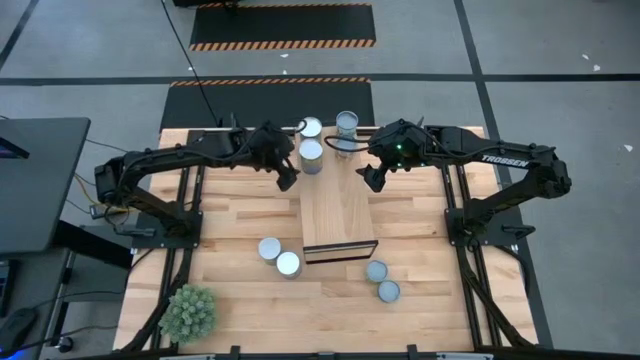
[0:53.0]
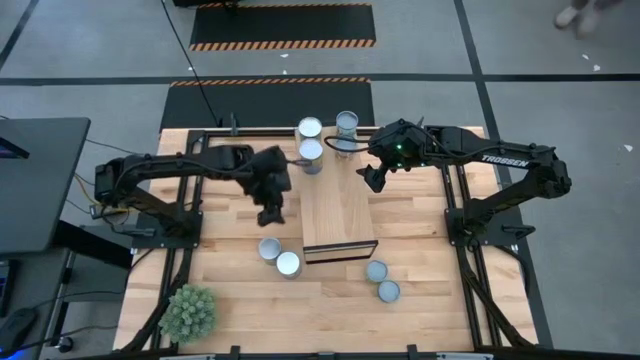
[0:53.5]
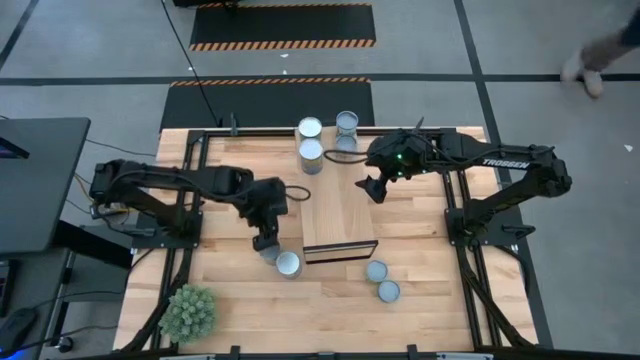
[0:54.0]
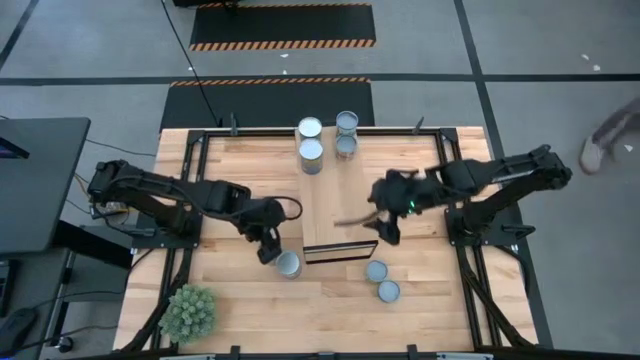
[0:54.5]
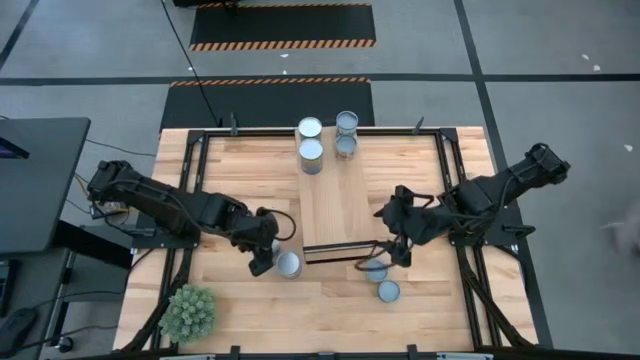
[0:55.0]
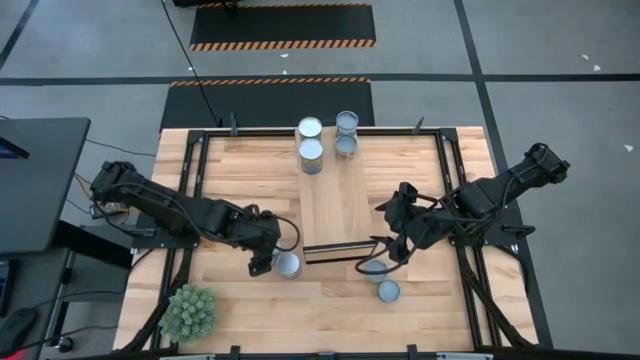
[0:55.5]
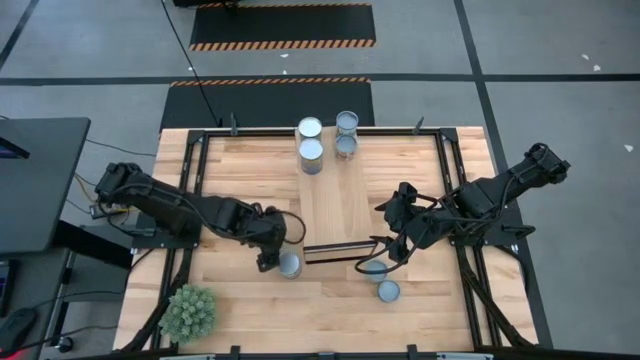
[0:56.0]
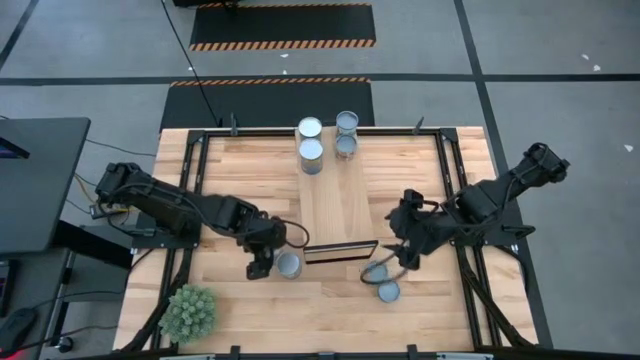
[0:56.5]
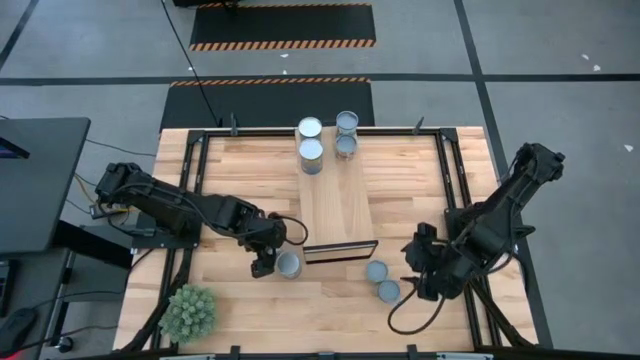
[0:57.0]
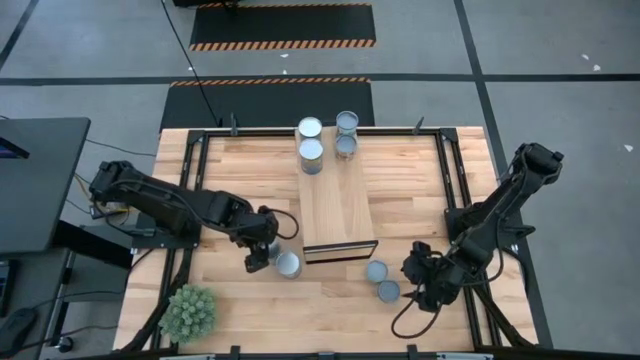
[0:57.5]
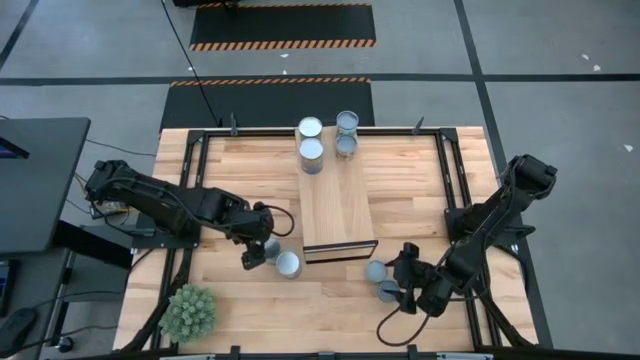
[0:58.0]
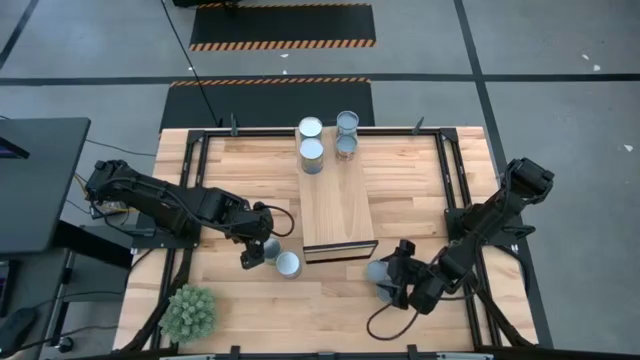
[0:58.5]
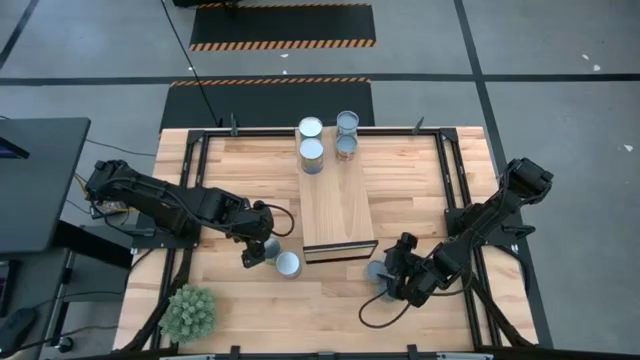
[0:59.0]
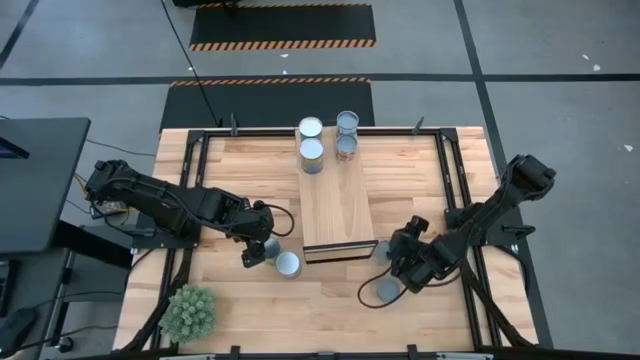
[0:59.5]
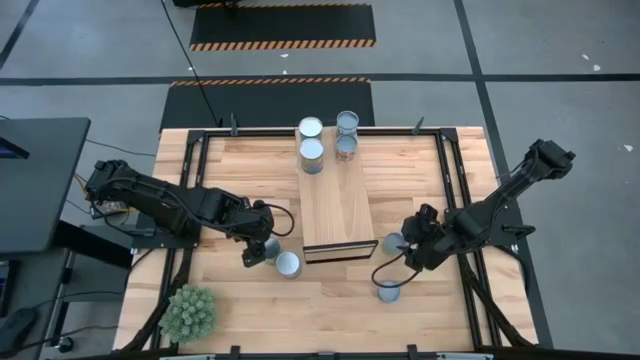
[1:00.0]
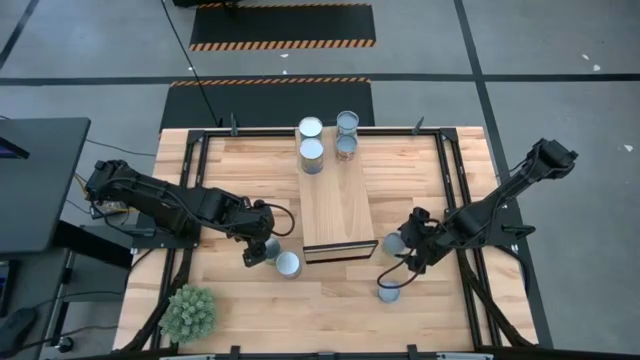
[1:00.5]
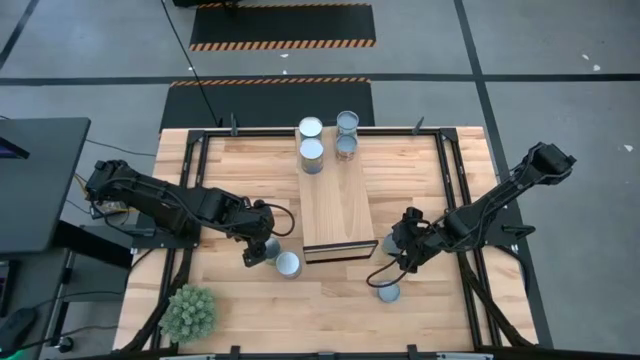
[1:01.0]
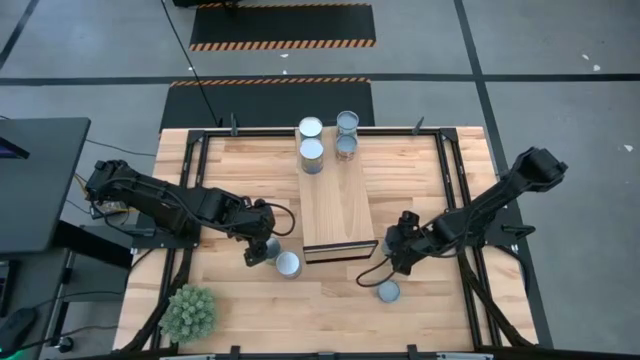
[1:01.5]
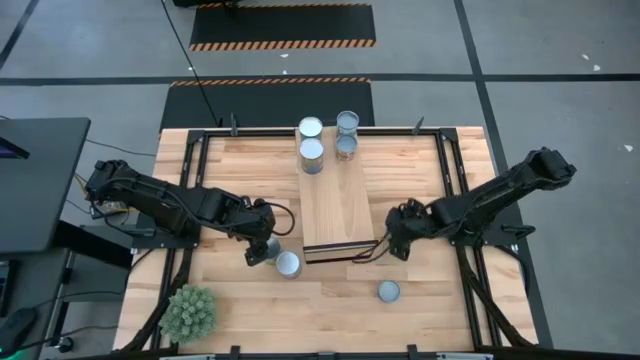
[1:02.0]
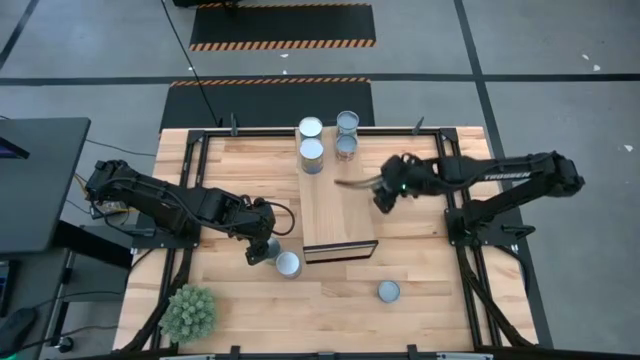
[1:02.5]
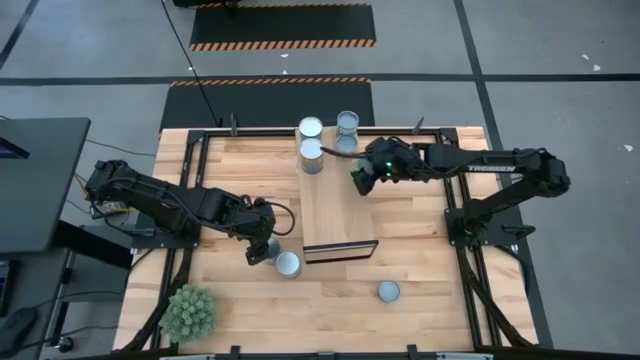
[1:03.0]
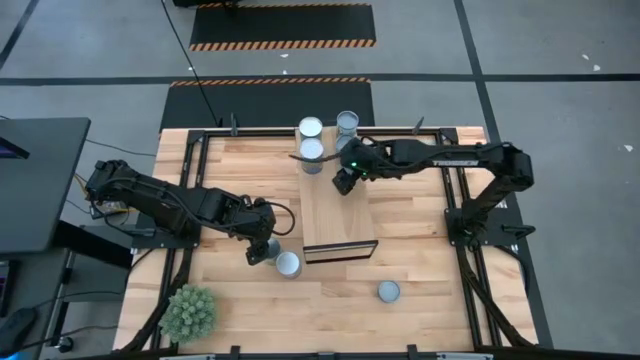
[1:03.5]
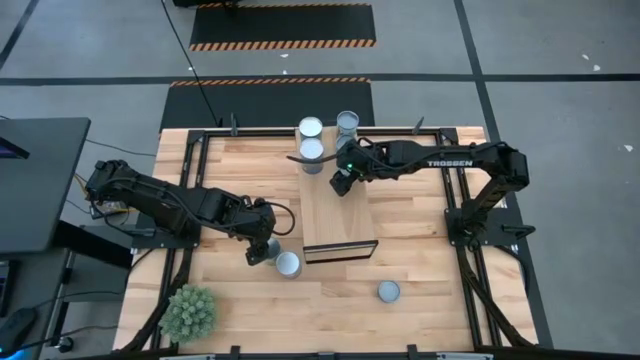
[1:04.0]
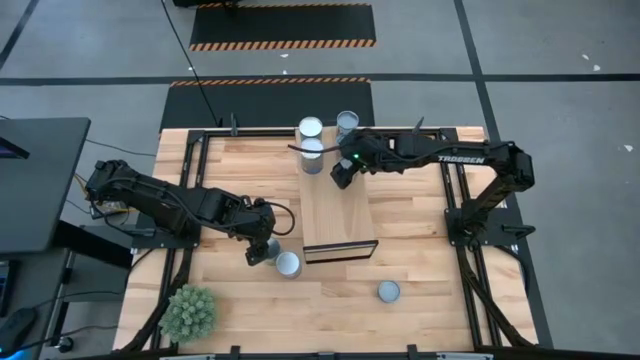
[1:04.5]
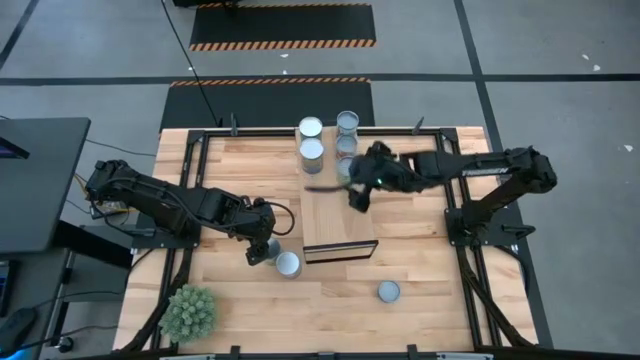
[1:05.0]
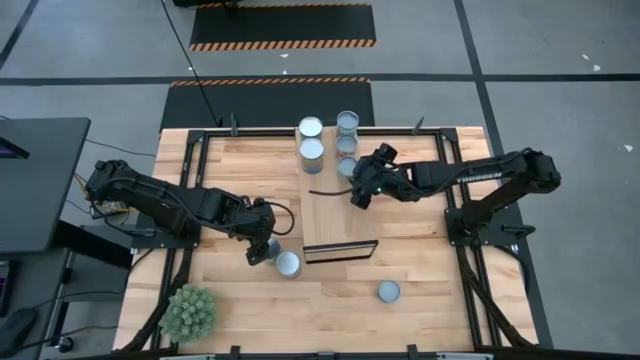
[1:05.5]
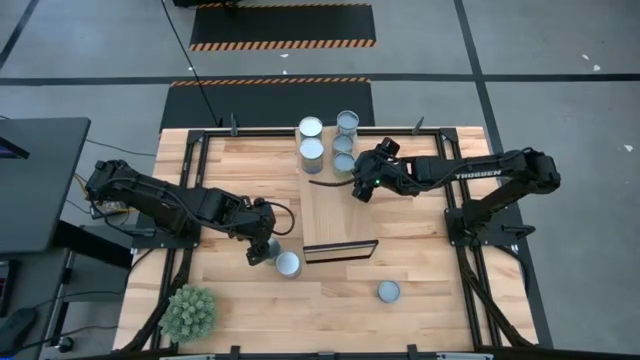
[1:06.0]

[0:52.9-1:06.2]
Task: Pick and place cans onto a shelf
Put the canned strawberries on the shelf

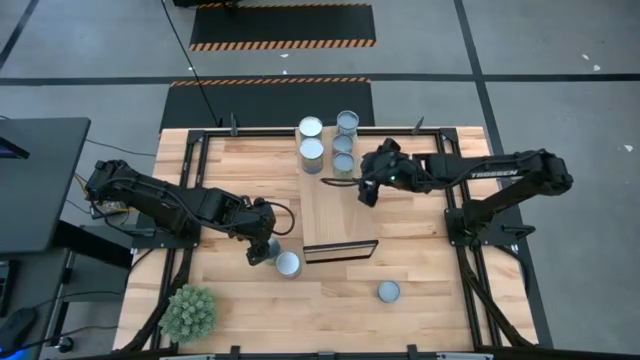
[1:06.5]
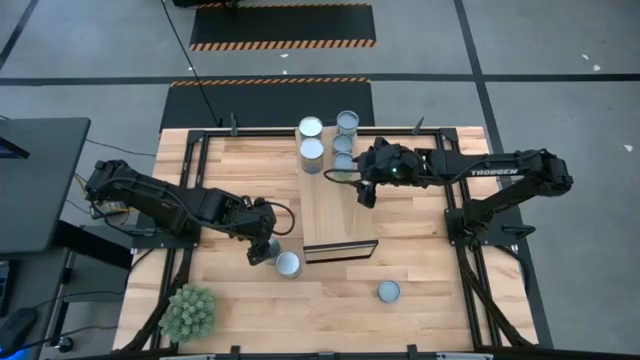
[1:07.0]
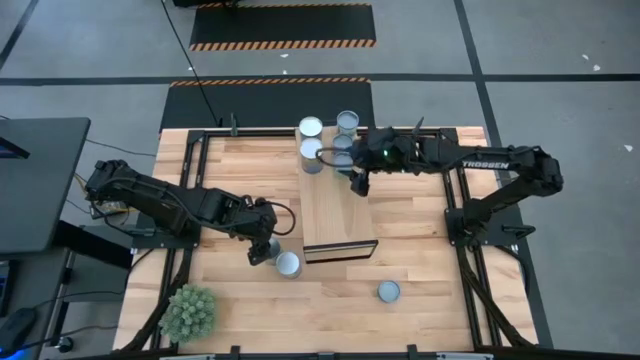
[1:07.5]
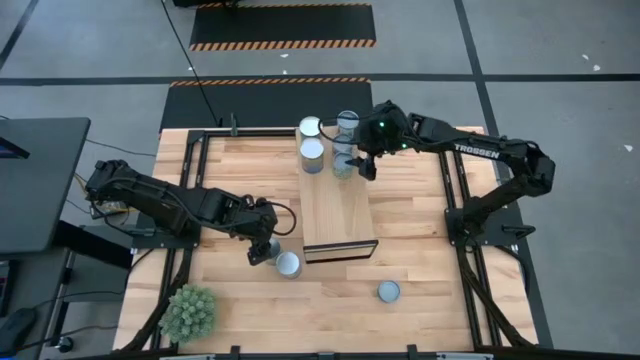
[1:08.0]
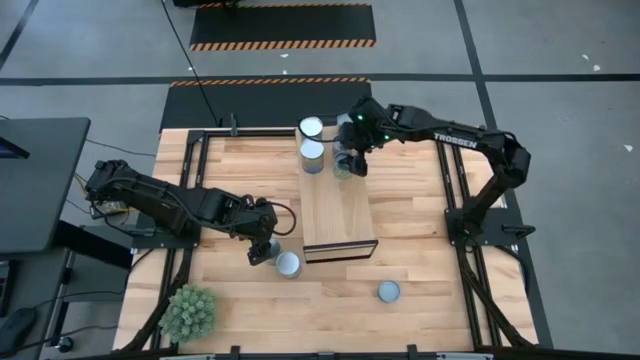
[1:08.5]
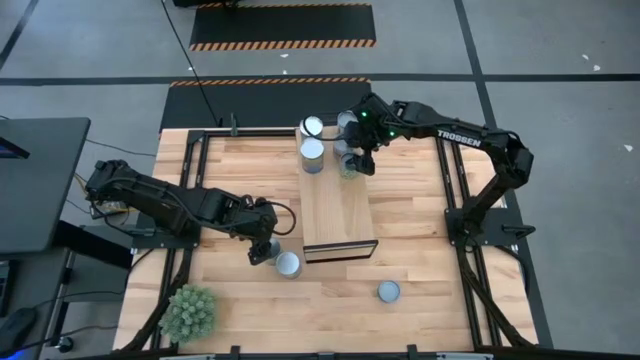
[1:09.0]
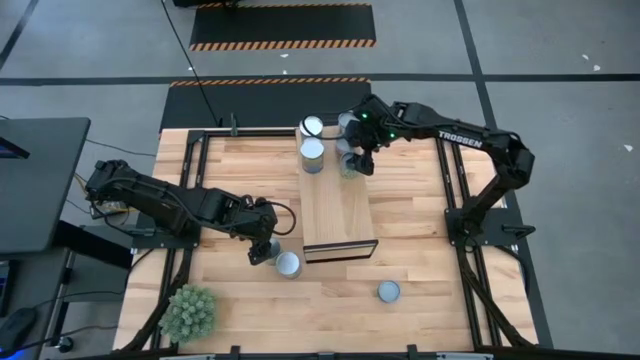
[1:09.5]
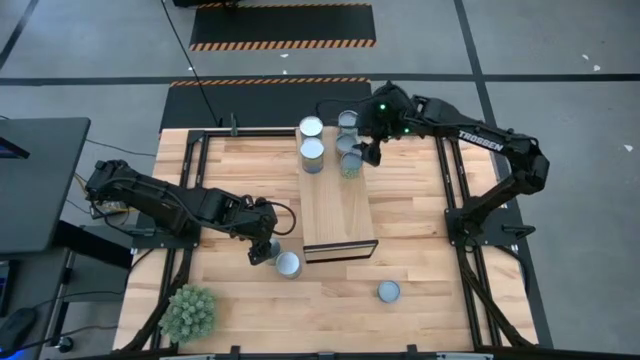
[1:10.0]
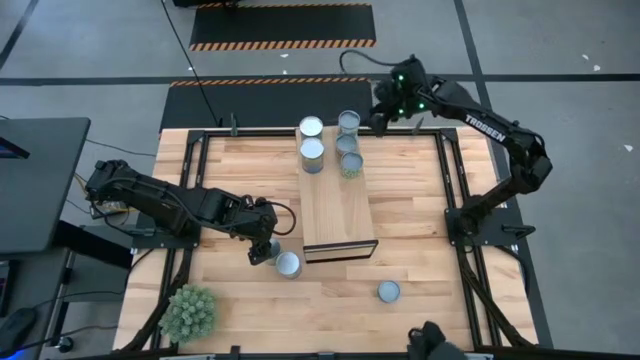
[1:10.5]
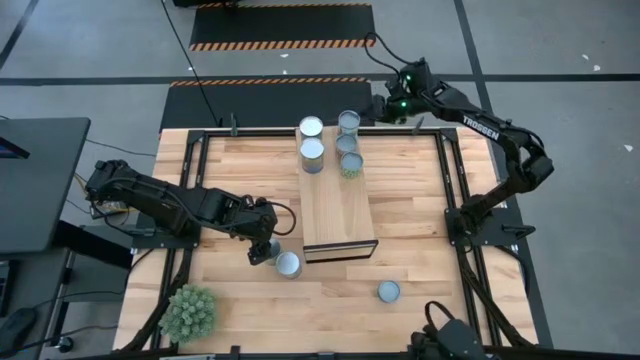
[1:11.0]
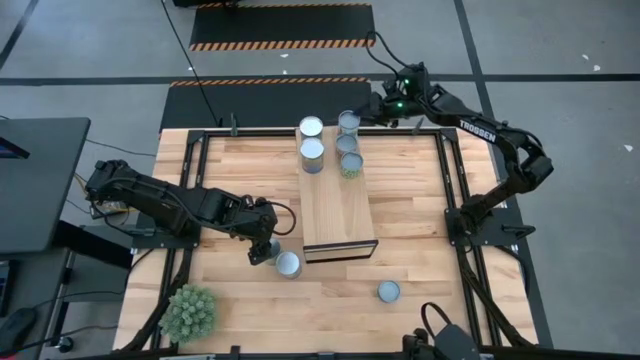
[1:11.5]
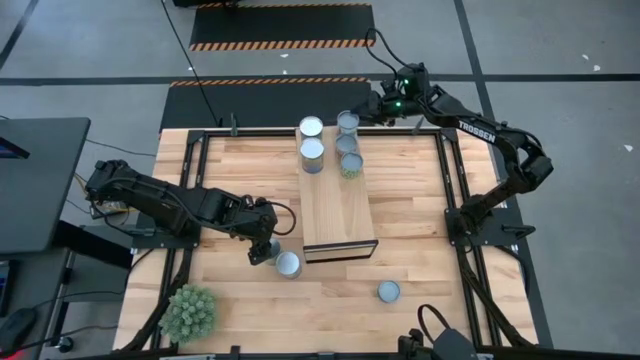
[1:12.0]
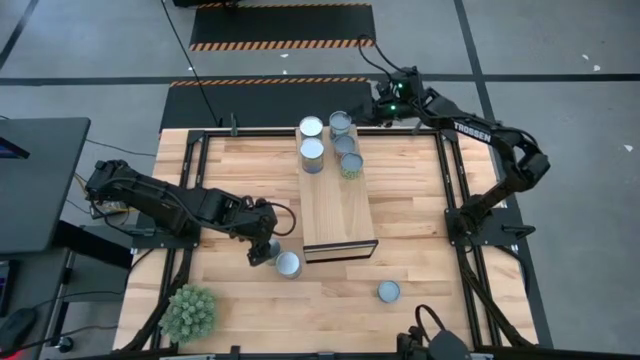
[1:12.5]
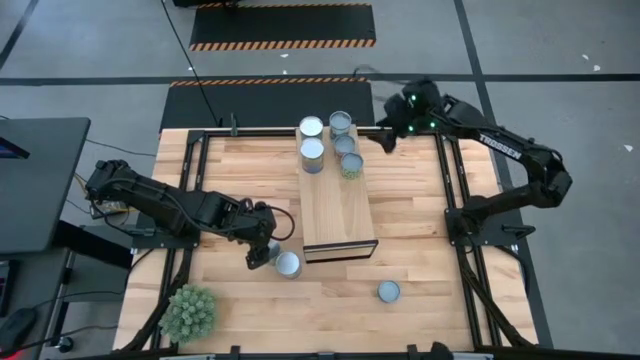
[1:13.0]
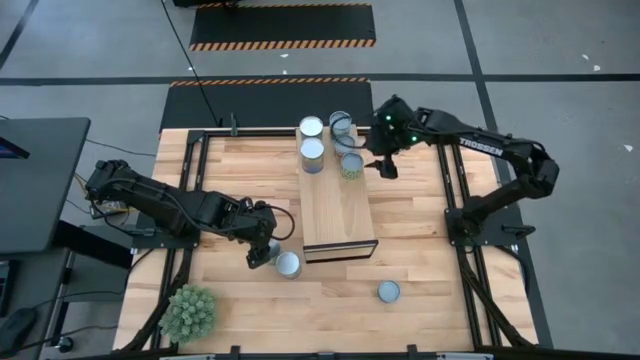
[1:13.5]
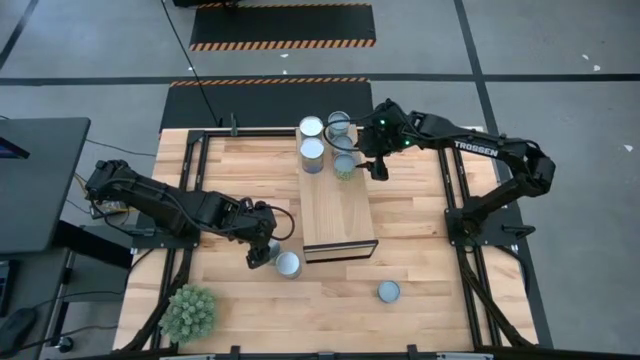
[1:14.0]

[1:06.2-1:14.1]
Adjust the canned goods on the shelf
